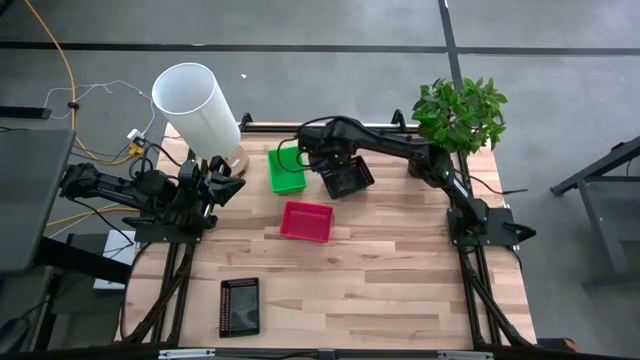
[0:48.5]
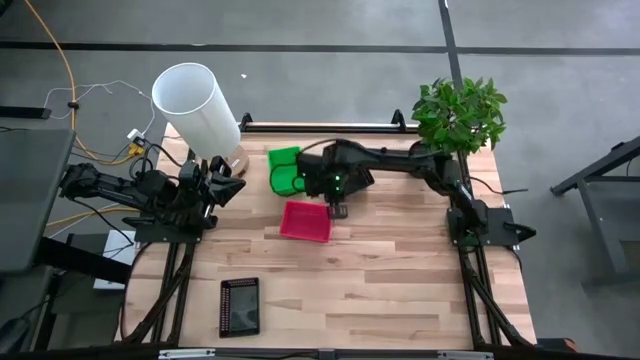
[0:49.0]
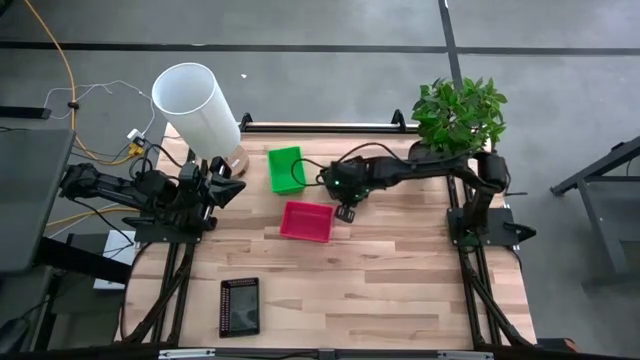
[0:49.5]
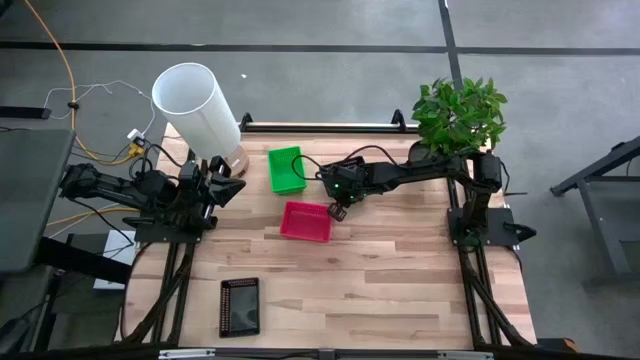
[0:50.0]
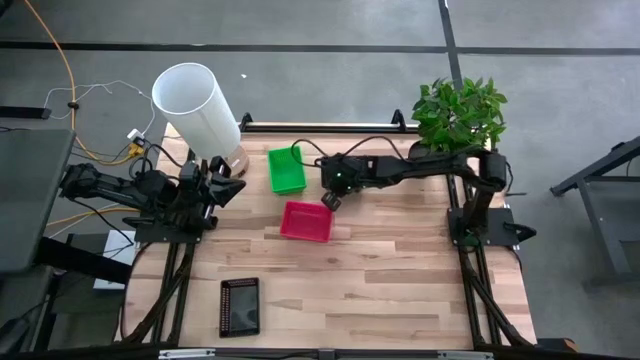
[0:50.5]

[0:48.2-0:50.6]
Adjust the black bins

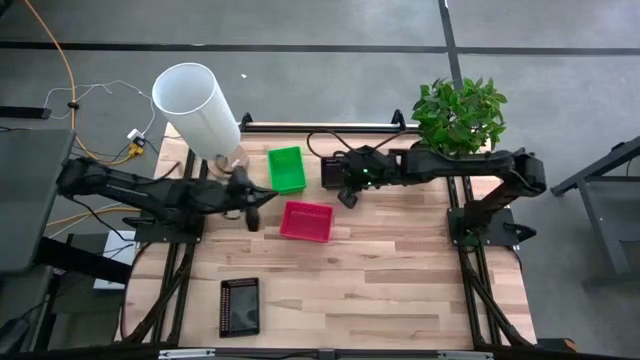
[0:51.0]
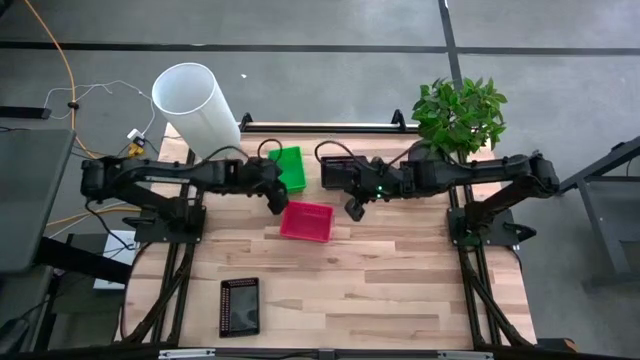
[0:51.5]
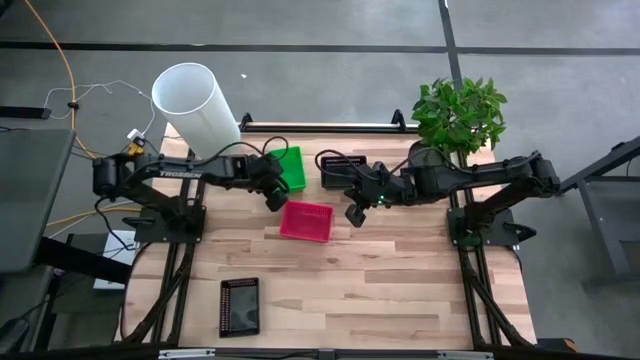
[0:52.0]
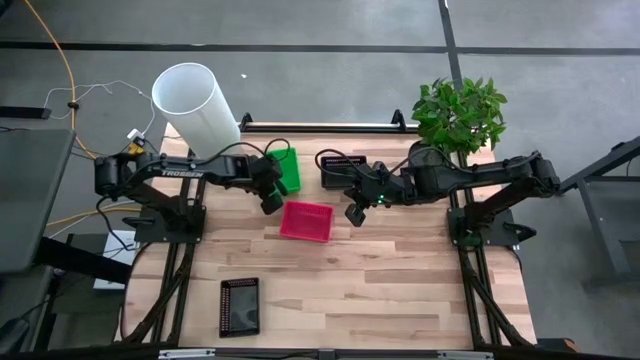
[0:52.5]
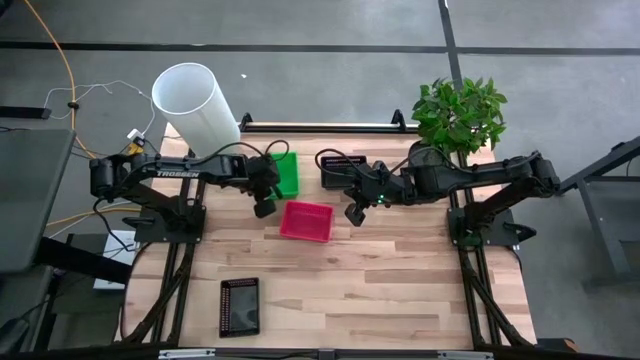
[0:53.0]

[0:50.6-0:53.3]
Adjust the green bins

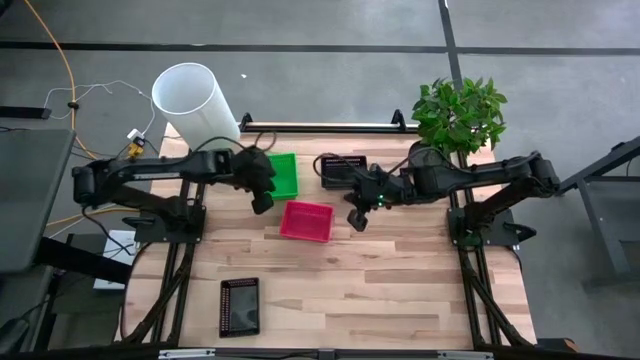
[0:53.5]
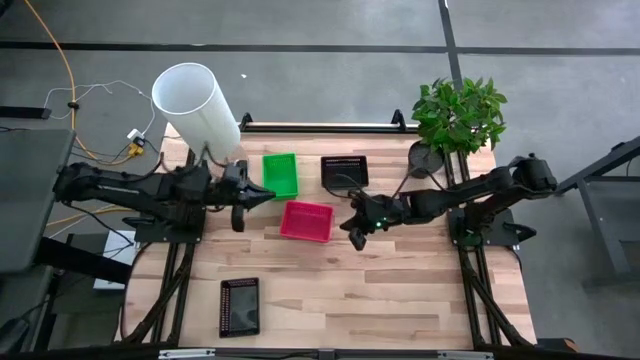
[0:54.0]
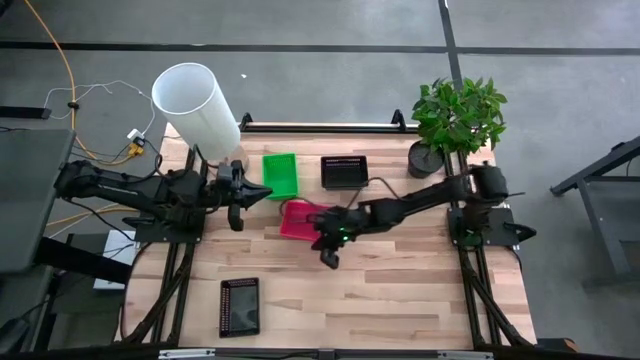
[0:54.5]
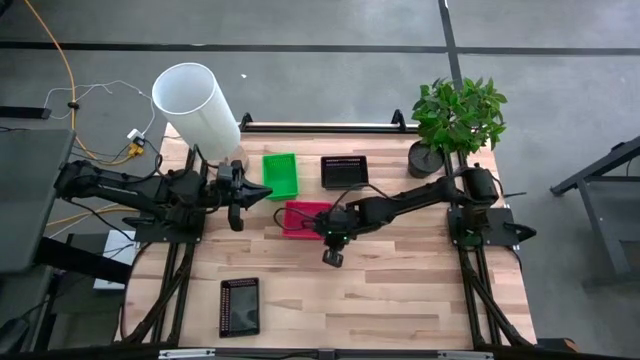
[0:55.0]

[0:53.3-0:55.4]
Adjust the red bins

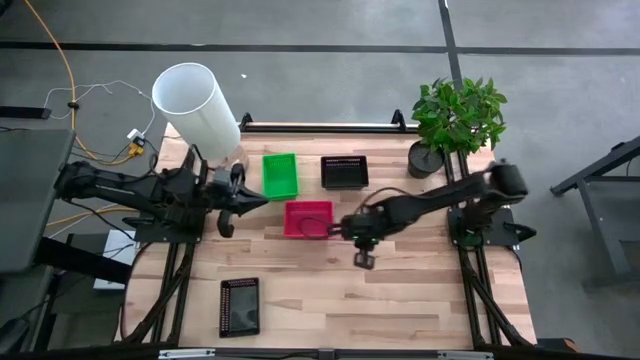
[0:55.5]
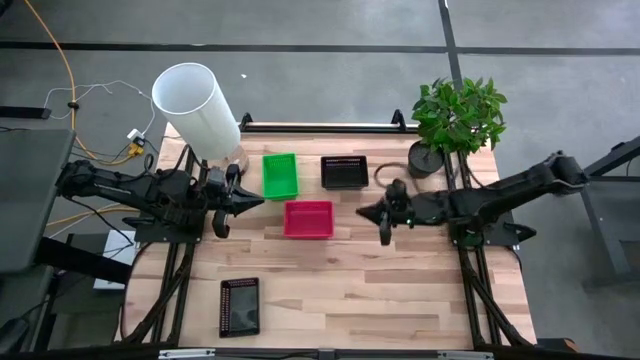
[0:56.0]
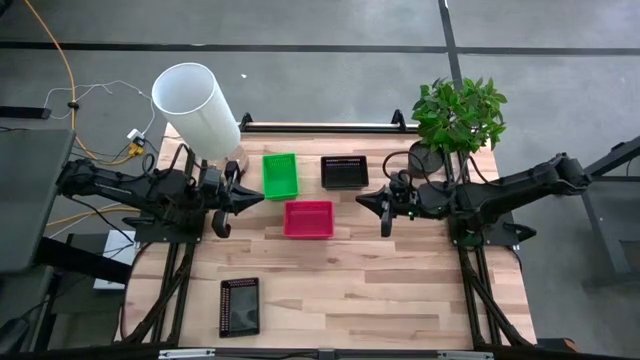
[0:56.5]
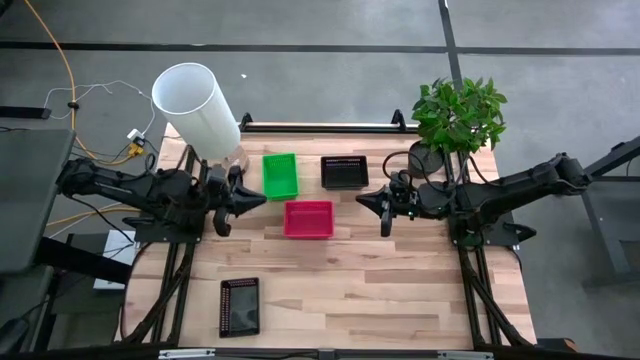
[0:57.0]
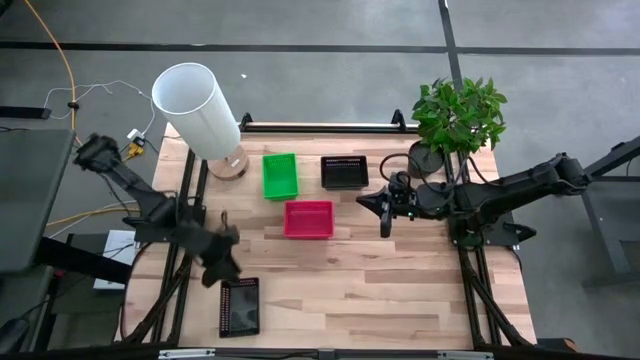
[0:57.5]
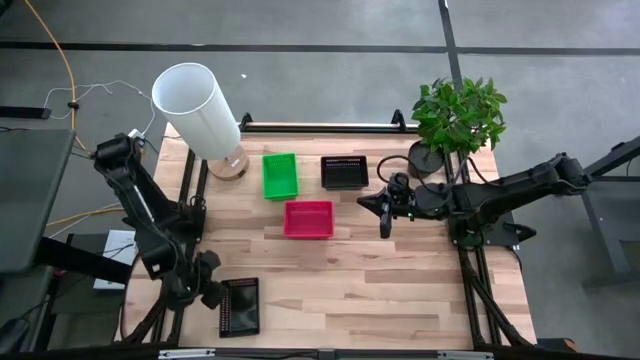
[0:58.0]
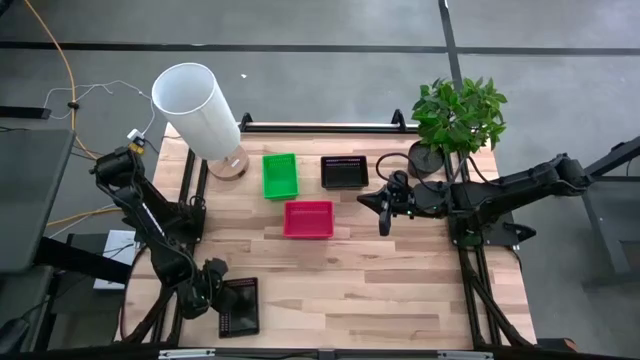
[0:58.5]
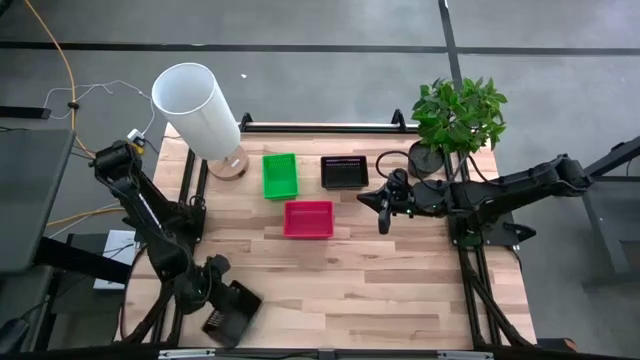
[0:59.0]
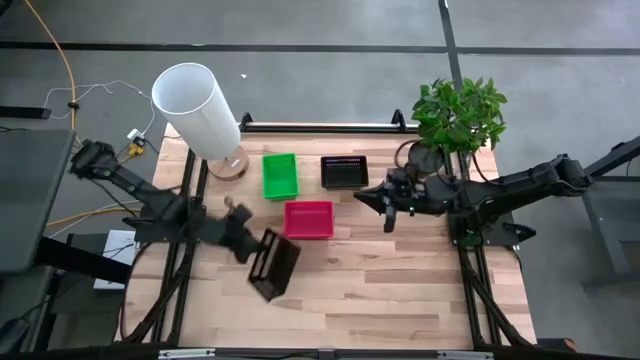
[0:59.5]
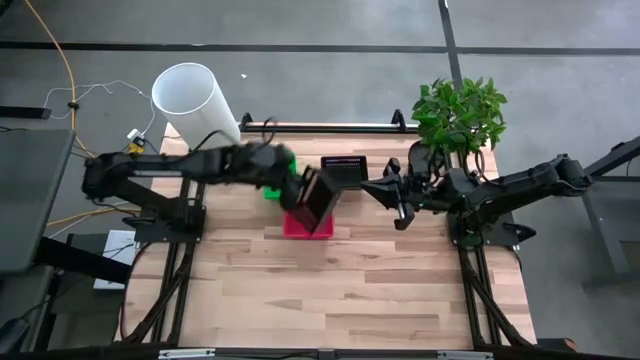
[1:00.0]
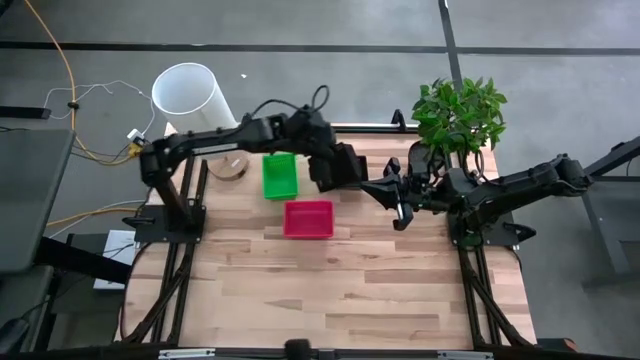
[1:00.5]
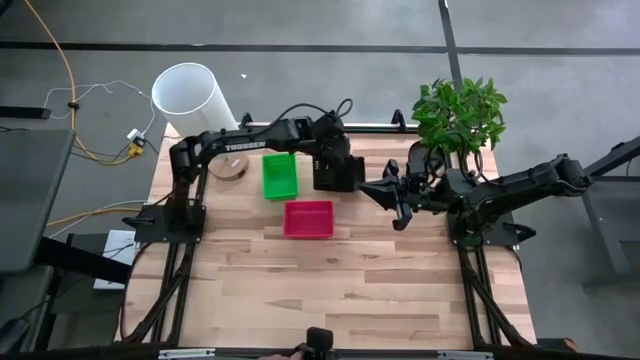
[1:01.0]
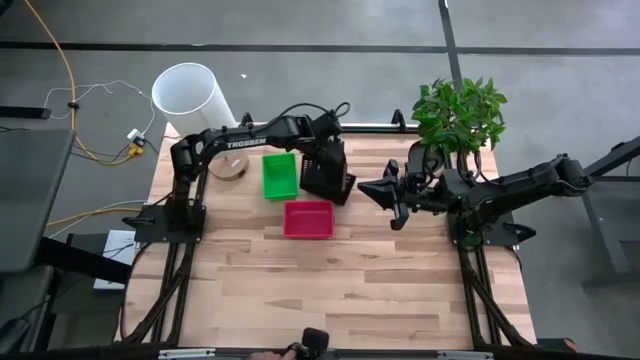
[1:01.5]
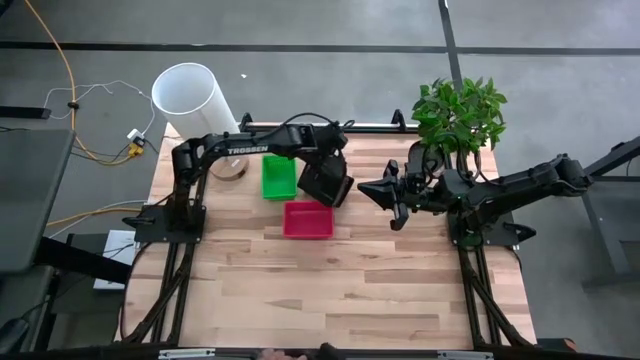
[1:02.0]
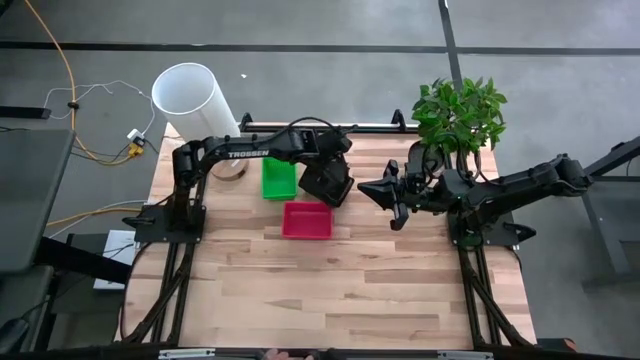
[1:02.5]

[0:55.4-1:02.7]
Stack the black bin on the black bin

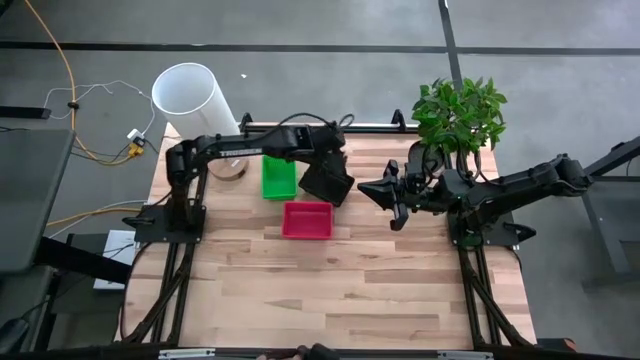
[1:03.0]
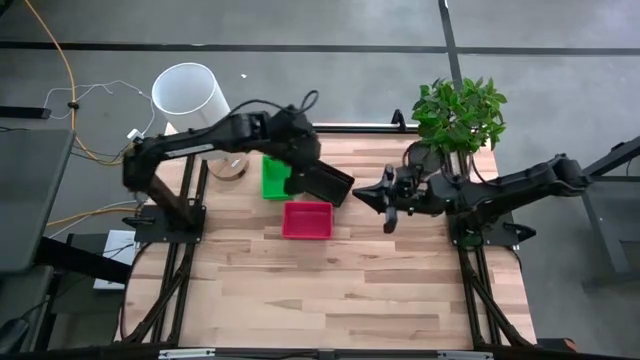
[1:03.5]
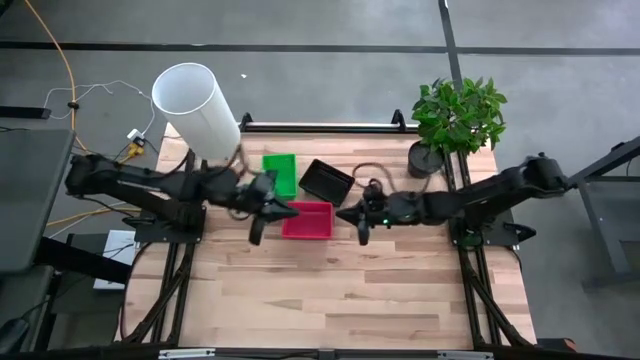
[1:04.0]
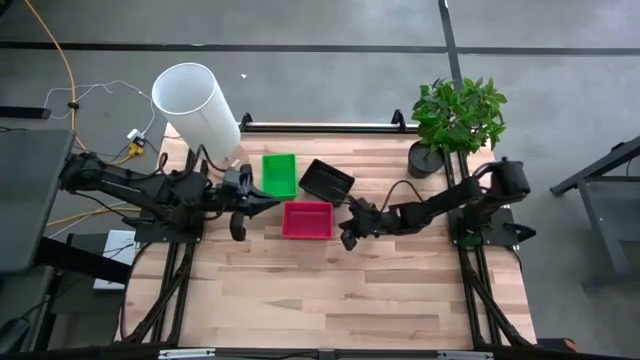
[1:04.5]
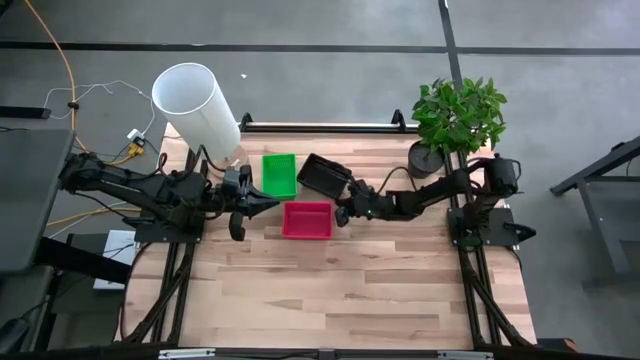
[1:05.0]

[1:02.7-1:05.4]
Adjust the black bins

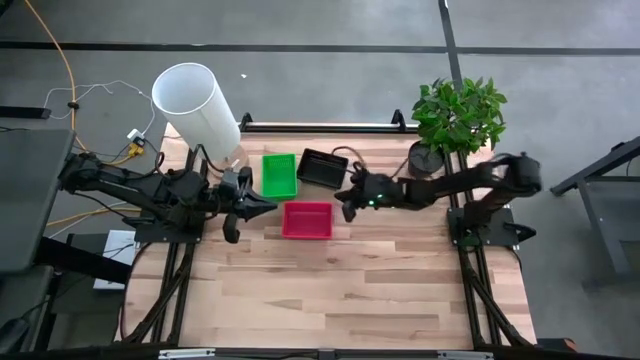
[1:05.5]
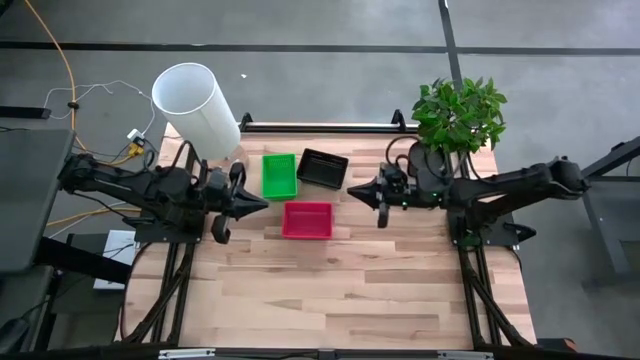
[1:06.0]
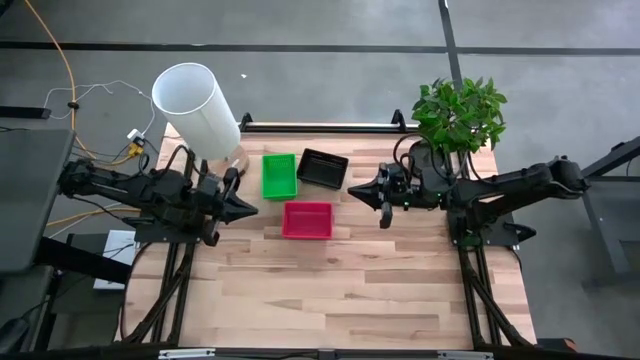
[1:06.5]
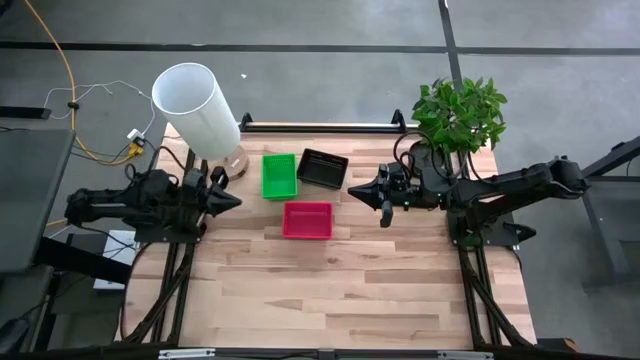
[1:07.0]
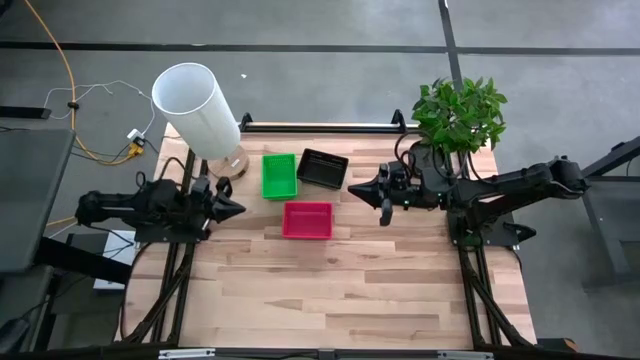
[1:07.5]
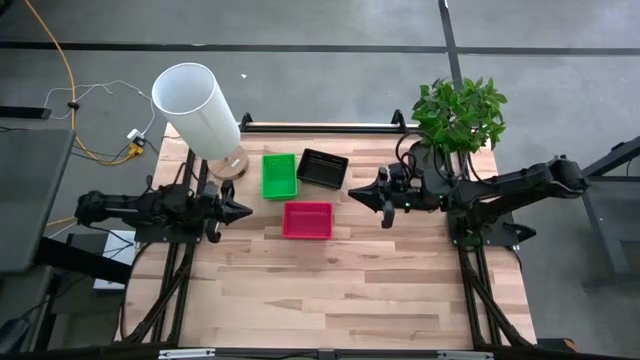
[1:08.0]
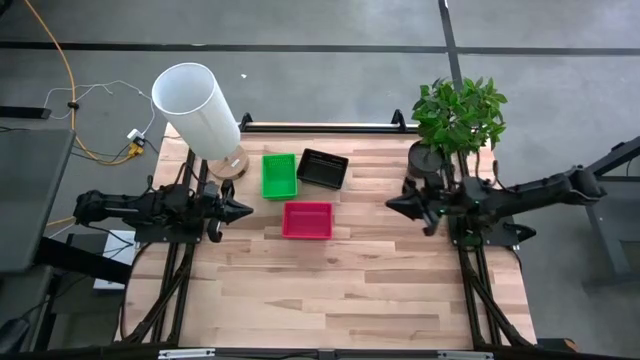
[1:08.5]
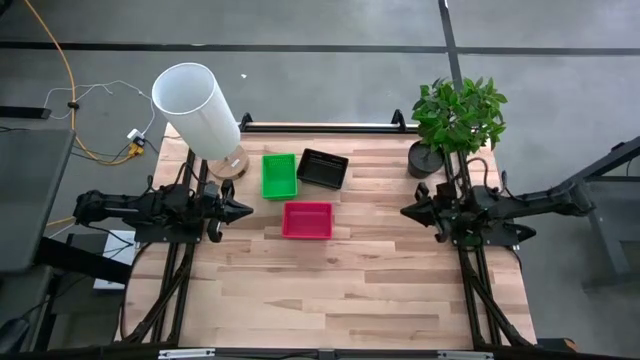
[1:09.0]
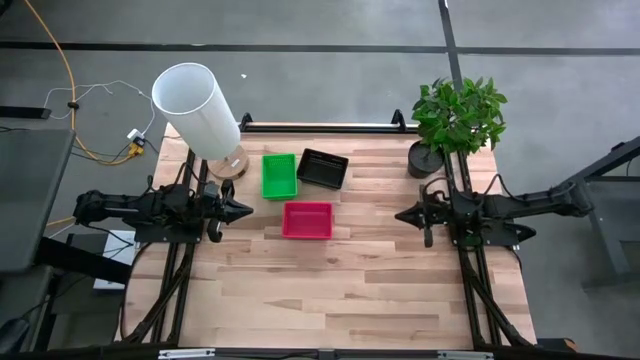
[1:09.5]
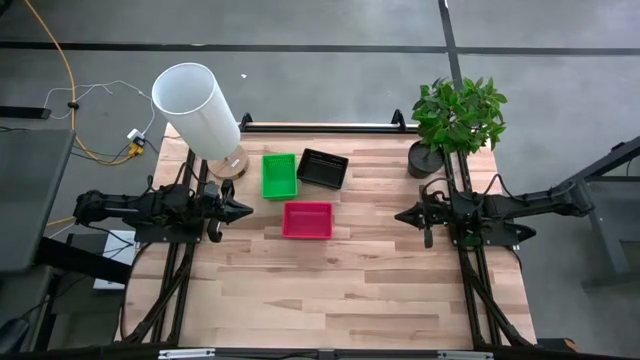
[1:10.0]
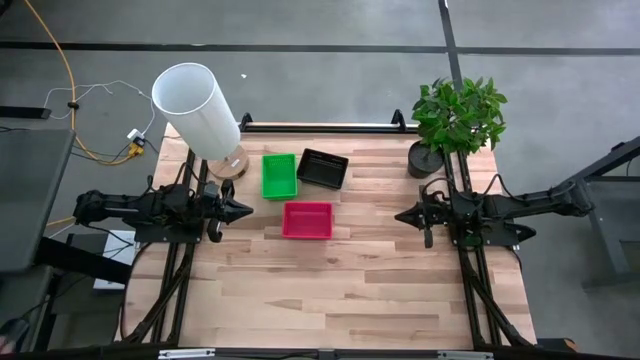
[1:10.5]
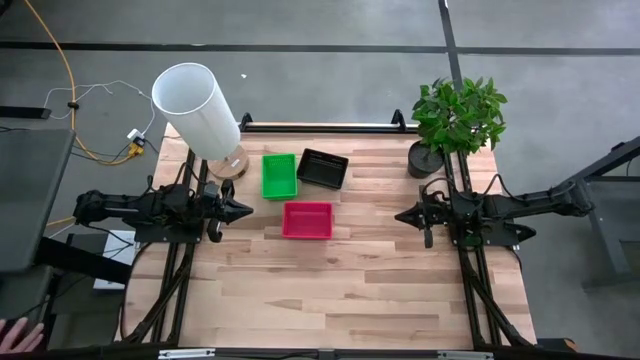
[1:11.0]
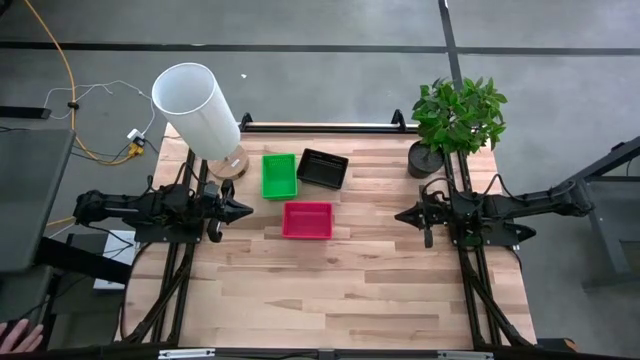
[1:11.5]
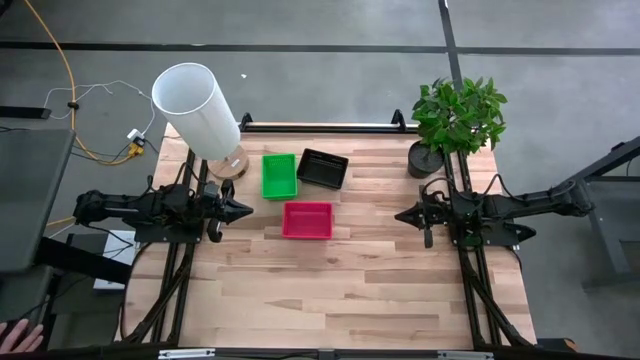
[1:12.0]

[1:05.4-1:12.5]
Return to Home Position
